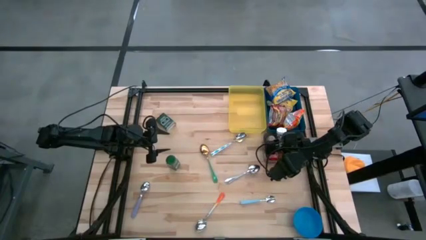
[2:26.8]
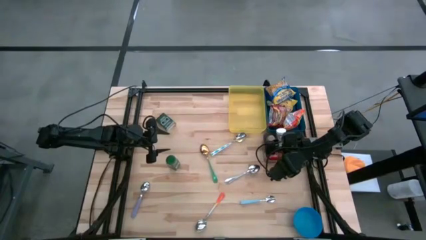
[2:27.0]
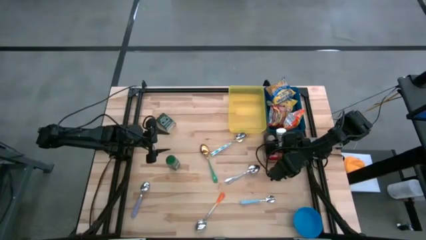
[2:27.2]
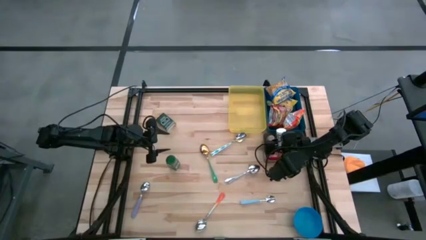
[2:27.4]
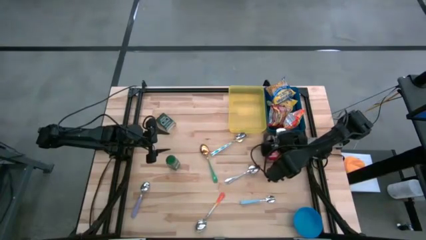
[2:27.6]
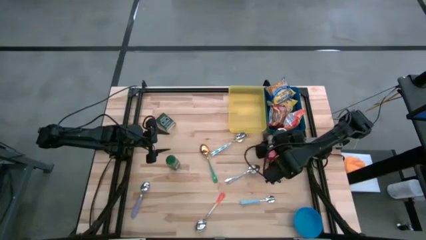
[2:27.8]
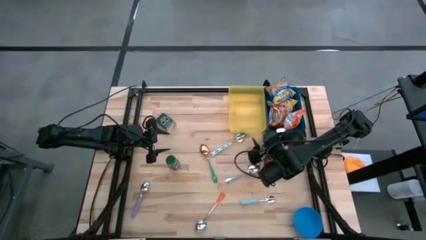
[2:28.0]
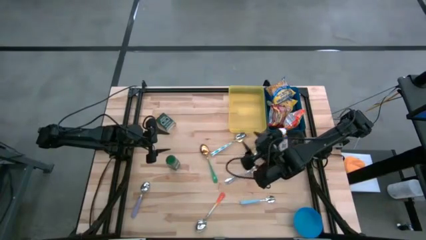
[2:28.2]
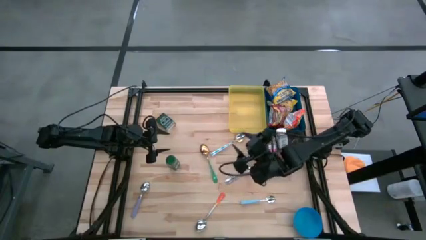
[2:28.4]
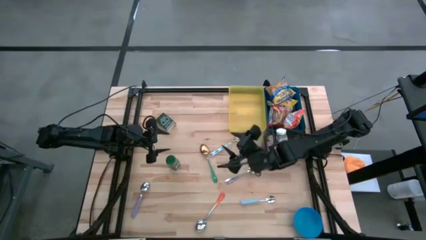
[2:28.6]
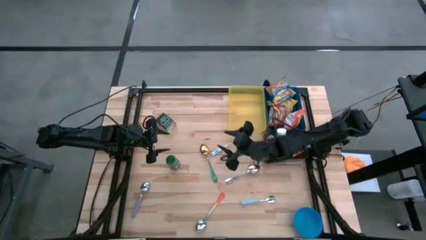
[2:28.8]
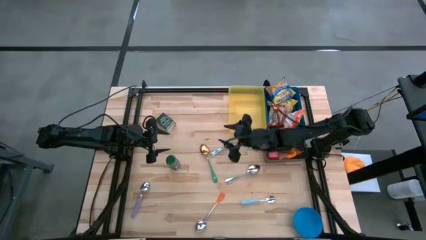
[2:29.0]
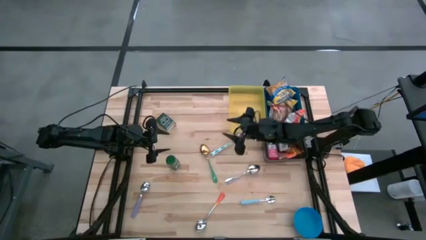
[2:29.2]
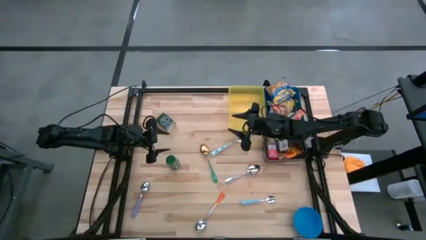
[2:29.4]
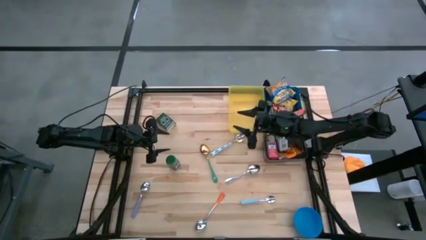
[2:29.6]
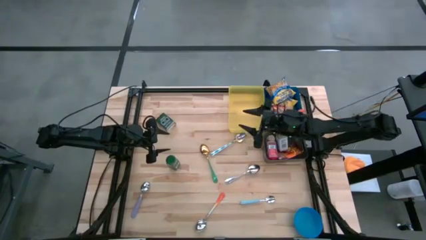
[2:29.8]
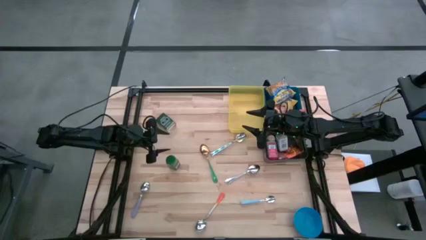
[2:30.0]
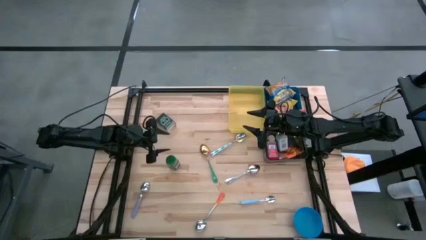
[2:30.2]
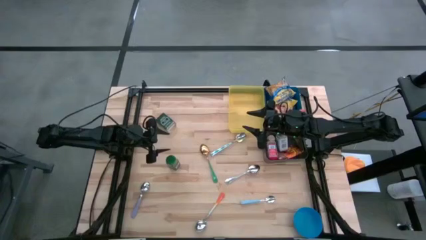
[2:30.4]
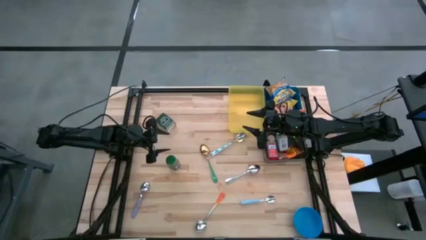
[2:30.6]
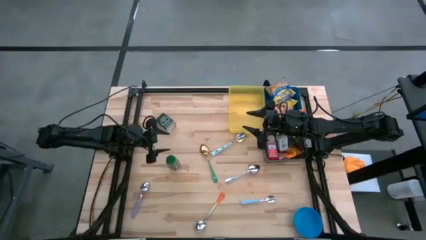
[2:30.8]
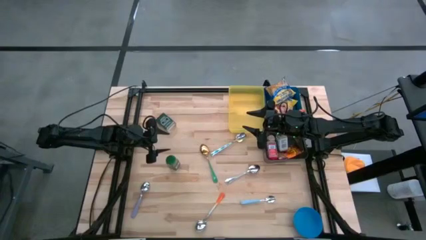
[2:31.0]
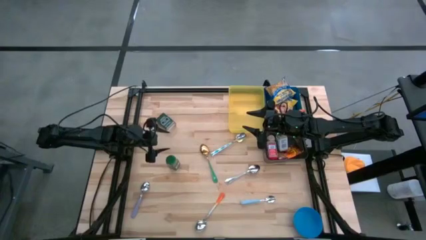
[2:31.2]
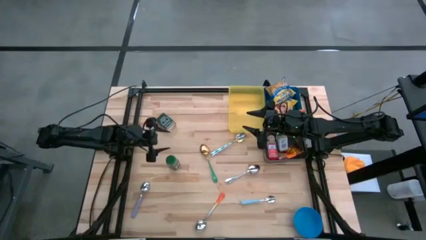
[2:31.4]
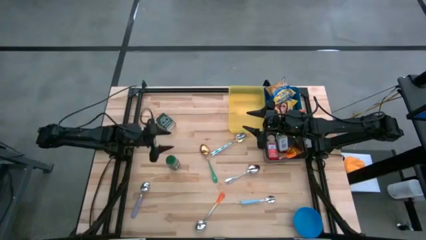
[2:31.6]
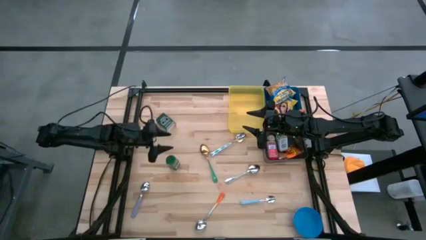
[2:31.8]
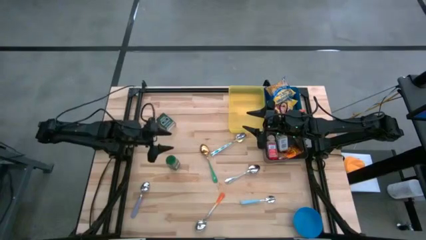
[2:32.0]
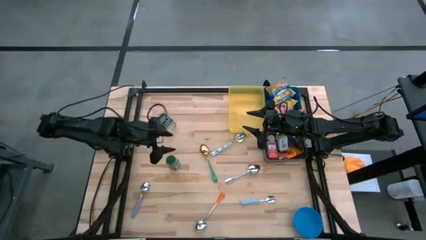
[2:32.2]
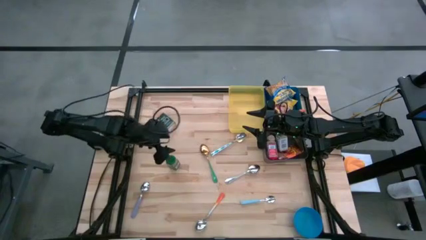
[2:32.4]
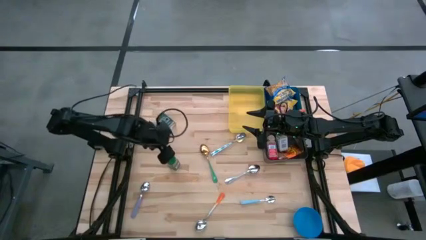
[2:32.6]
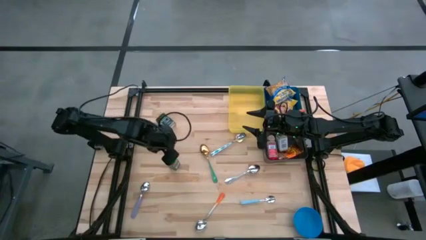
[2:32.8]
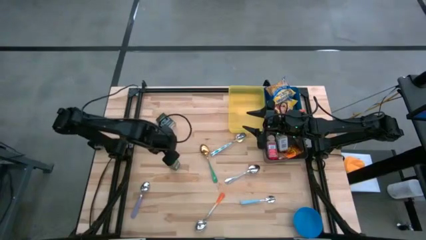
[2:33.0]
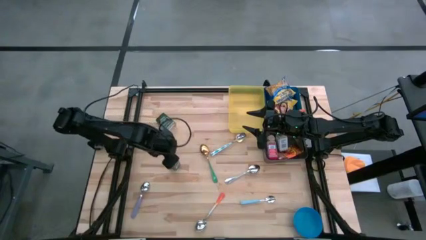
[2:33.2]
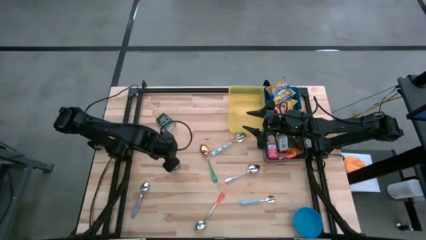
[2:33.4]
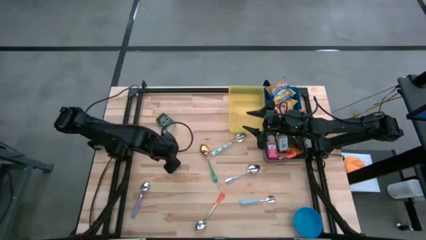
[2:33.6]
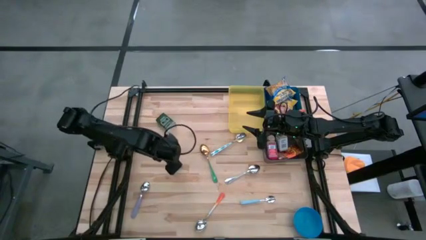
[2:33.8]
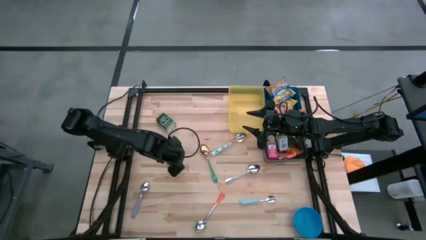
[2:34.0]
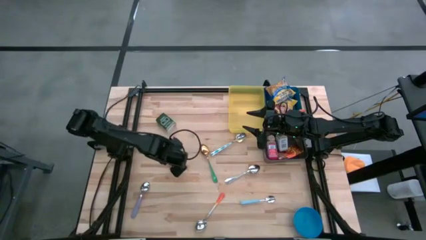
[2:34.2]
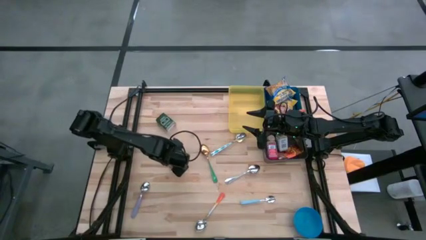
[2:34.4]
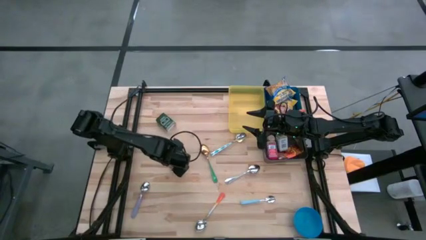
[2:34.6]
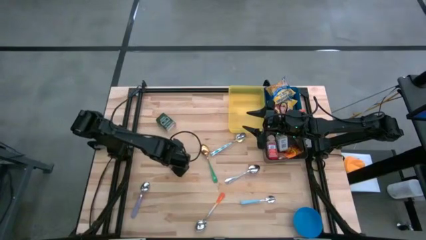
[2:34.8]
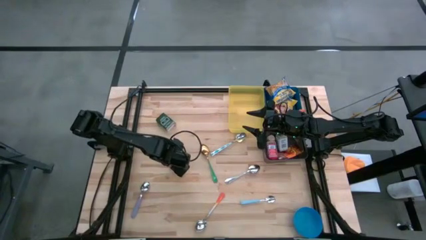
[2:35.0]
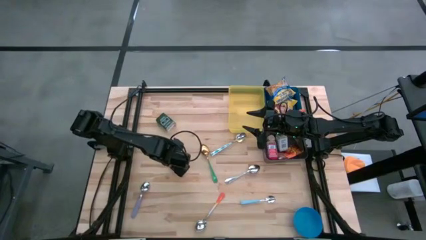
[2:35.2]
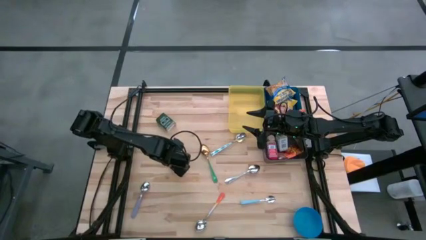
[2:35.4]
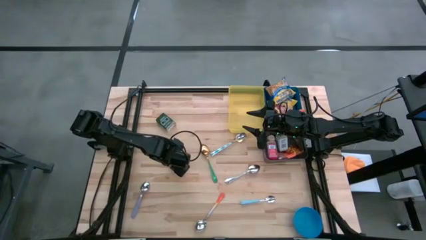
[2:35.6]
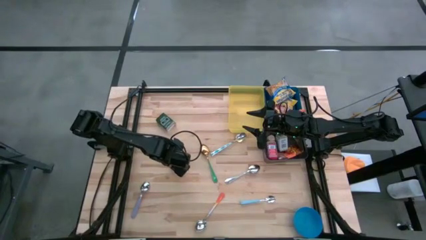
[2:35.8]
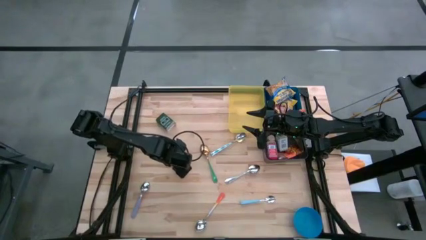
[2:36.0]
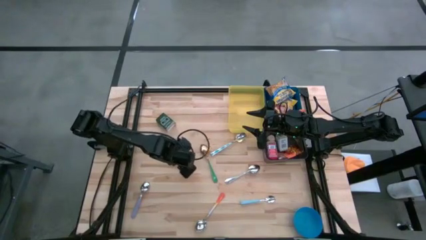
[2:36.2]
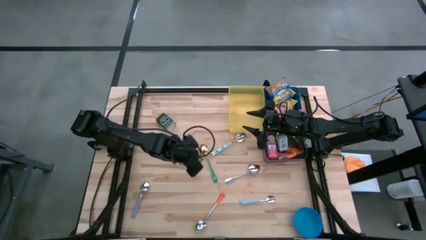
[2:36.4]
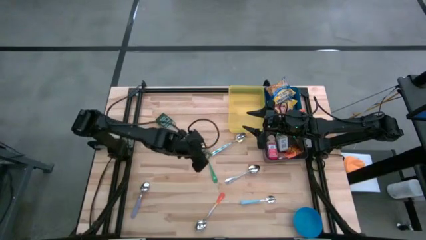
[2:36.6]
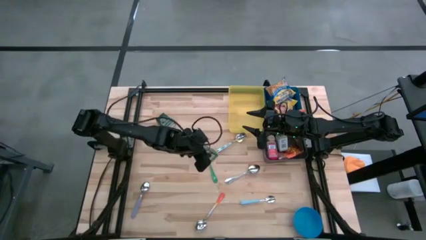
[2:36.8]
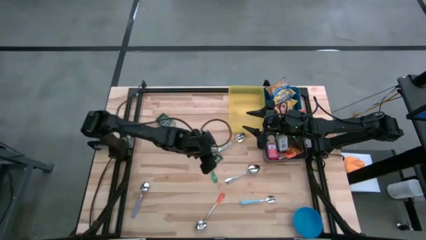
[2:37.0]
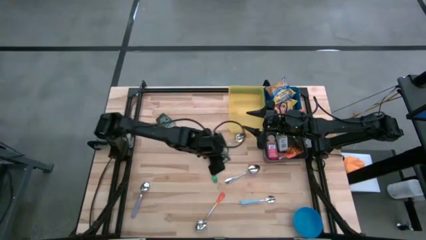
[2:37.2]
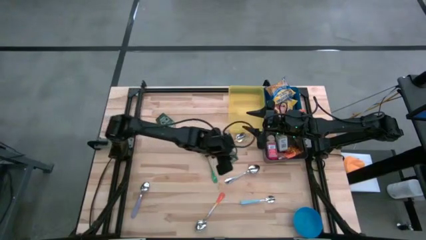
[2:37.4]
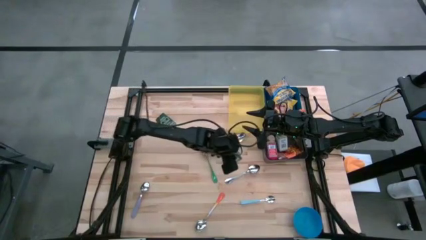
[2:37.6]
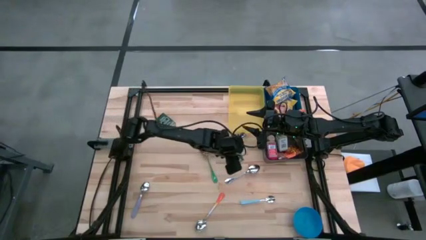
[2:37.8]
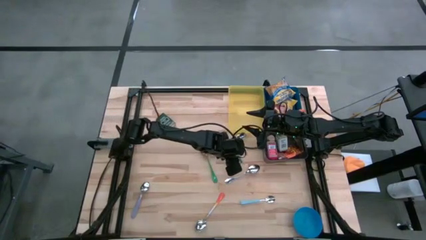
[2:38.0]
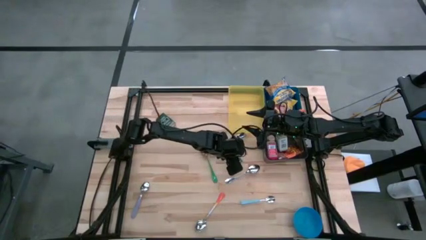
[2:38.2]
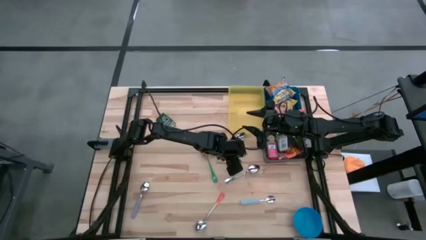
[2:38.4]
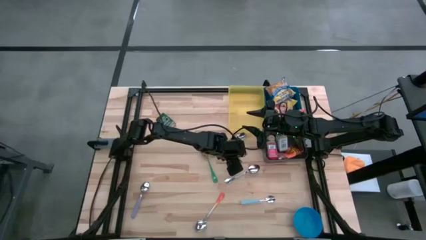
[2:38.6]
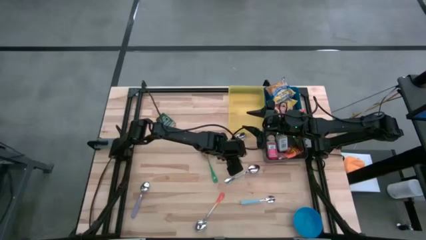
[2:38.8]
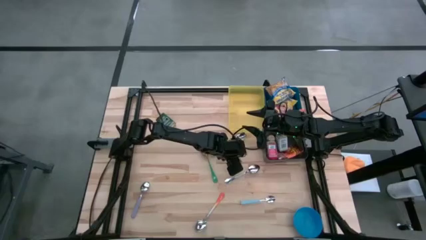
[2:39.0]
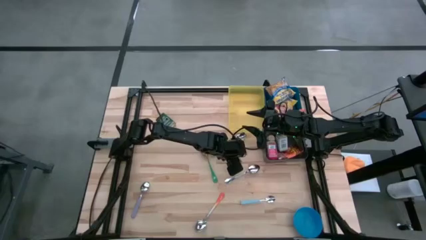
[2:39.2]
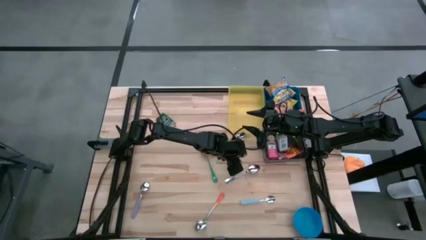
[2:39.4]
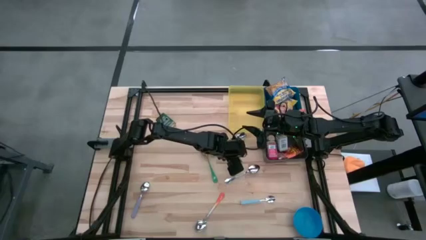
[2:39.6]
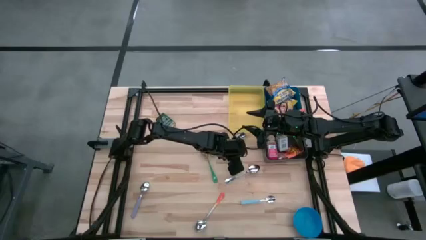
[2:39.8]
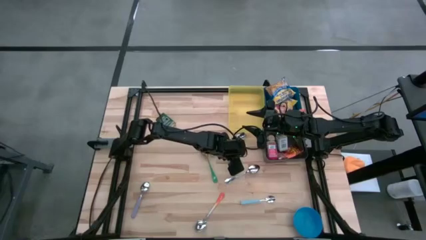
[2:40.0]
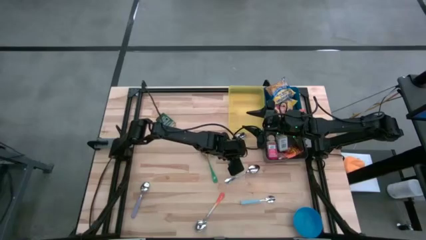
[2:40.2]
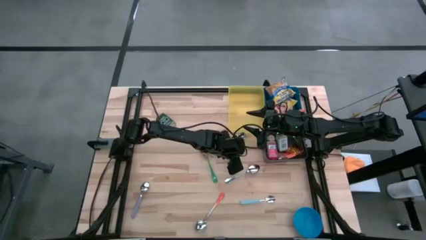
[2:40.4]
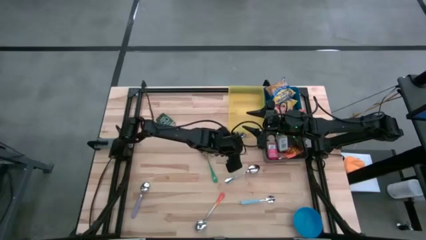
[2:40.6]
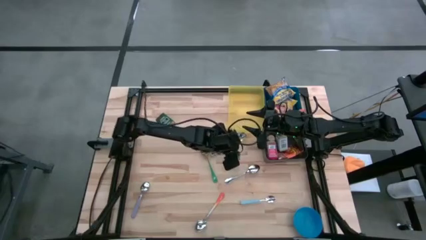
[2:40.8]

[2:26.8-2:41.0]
Put the green seasoning bottle into the black bin
